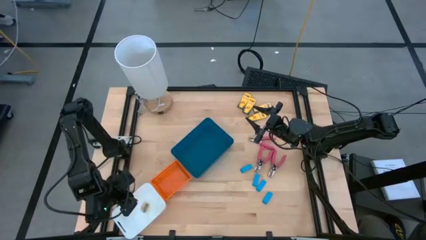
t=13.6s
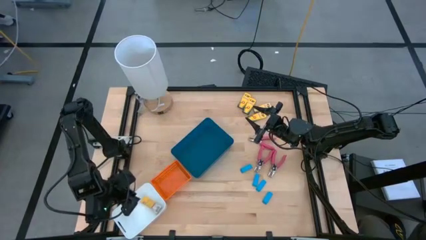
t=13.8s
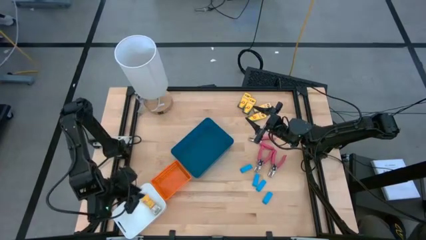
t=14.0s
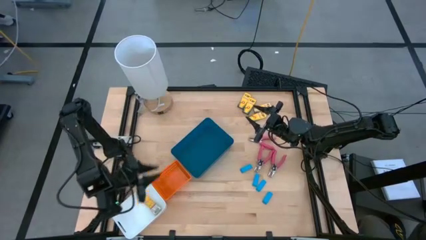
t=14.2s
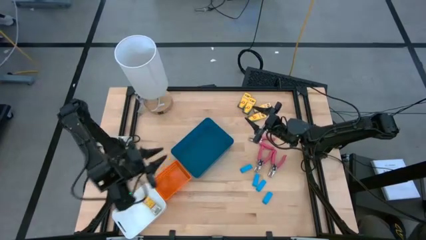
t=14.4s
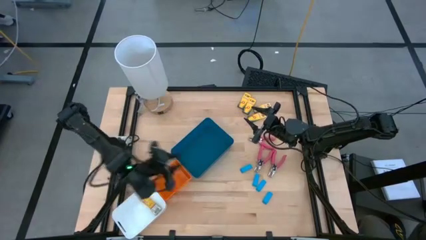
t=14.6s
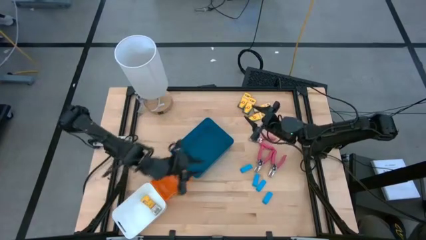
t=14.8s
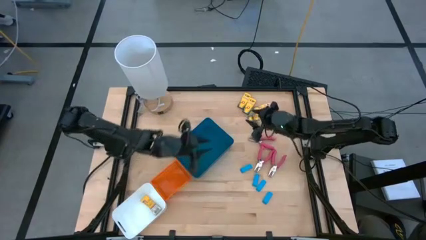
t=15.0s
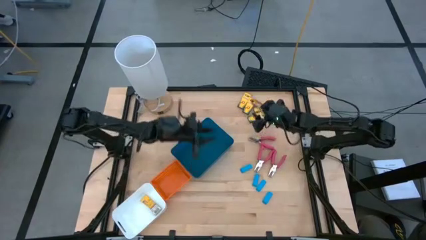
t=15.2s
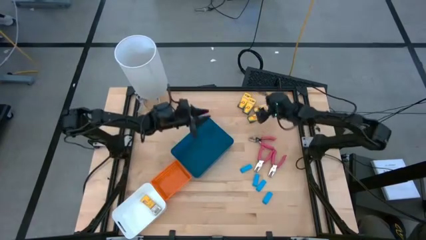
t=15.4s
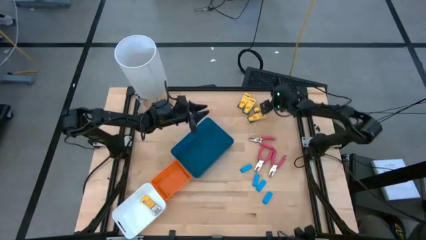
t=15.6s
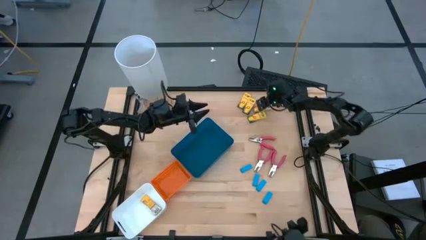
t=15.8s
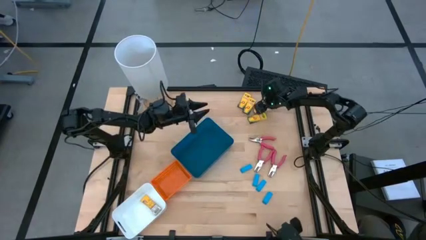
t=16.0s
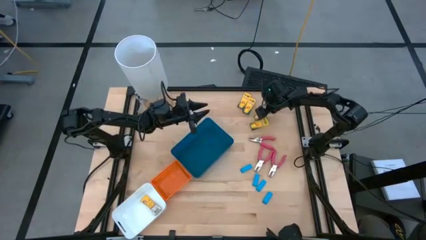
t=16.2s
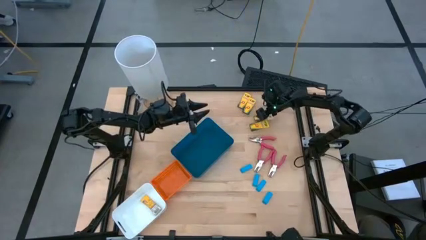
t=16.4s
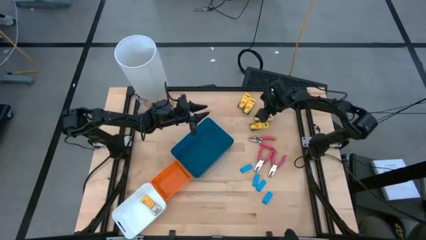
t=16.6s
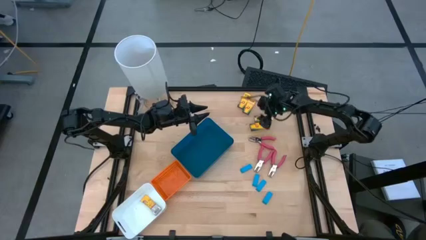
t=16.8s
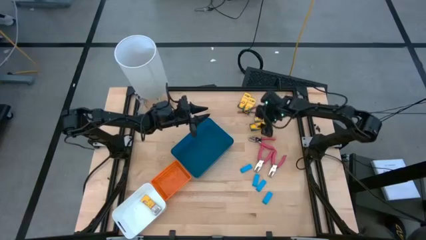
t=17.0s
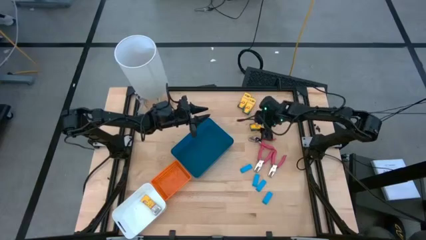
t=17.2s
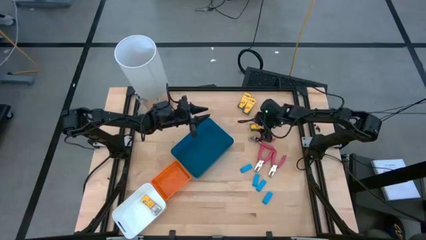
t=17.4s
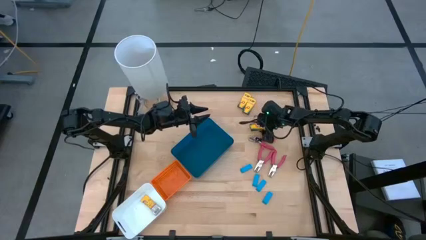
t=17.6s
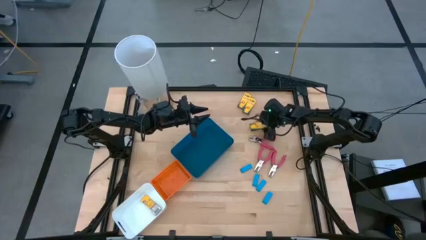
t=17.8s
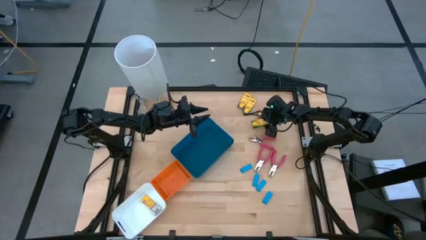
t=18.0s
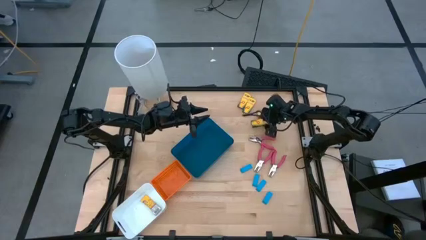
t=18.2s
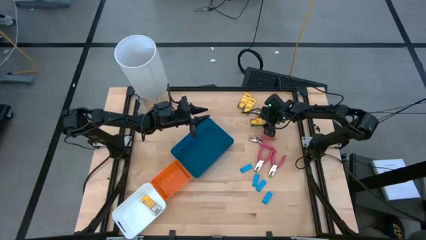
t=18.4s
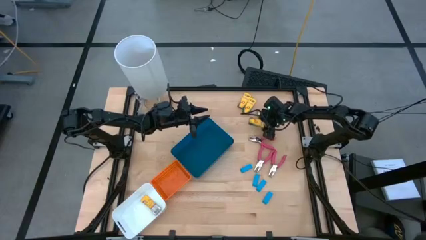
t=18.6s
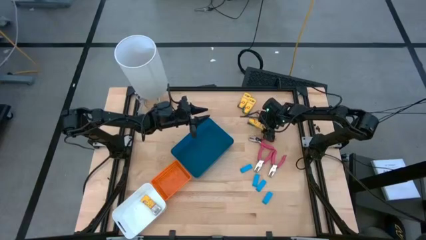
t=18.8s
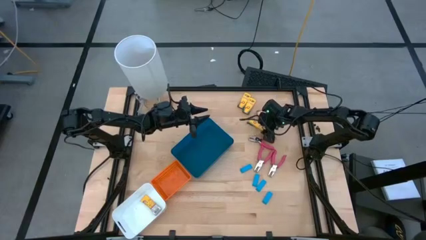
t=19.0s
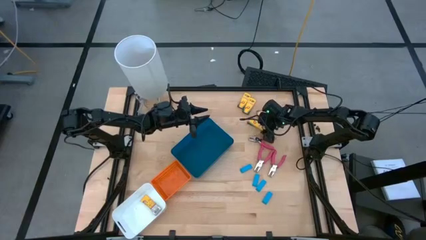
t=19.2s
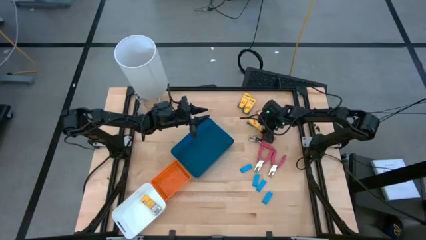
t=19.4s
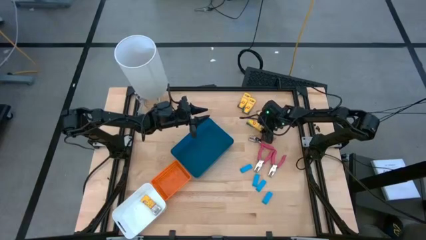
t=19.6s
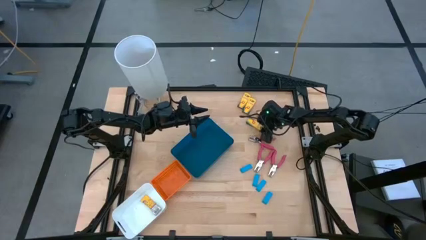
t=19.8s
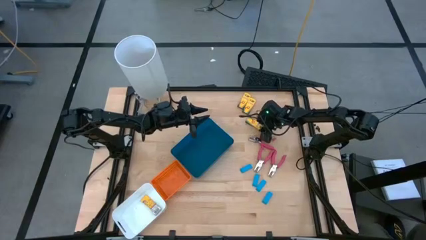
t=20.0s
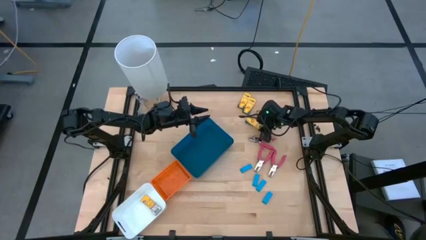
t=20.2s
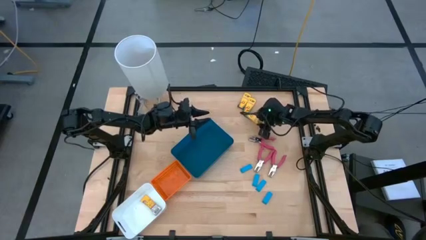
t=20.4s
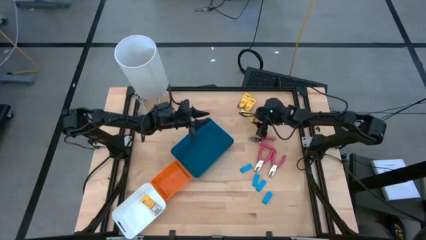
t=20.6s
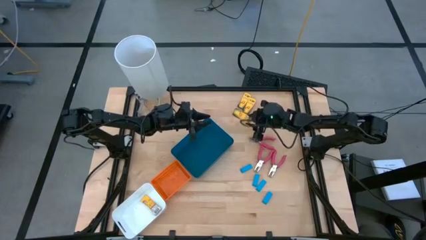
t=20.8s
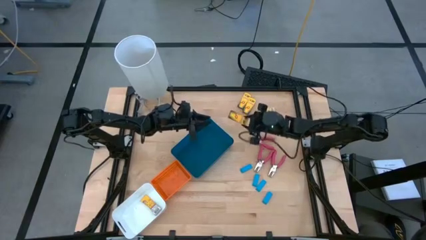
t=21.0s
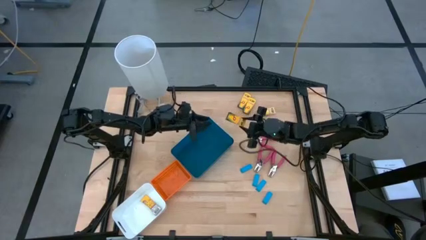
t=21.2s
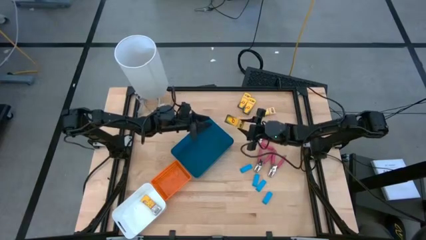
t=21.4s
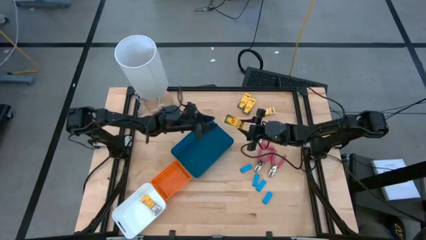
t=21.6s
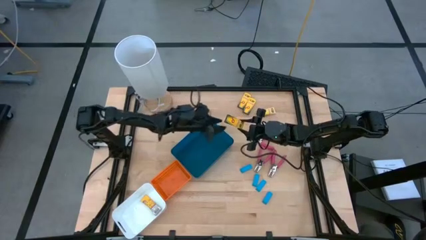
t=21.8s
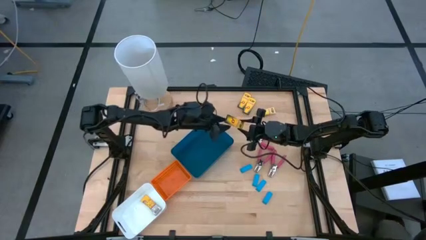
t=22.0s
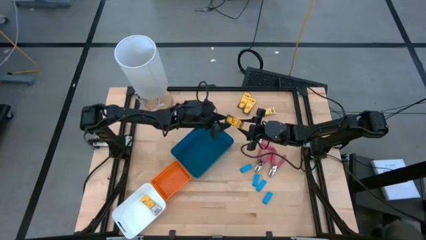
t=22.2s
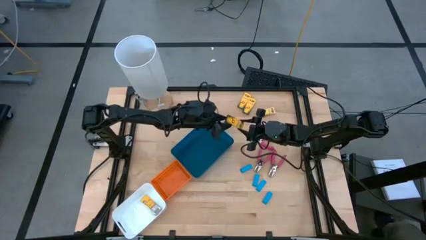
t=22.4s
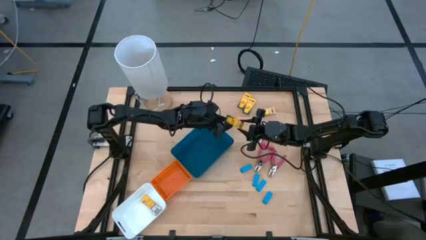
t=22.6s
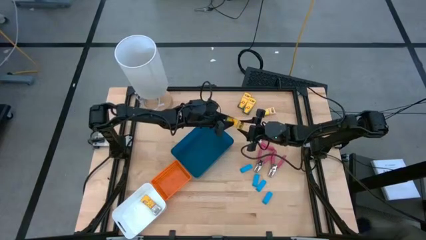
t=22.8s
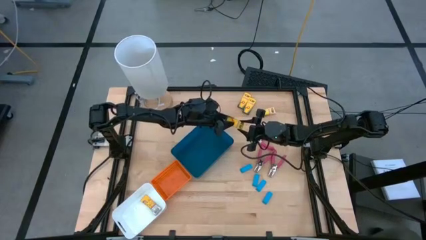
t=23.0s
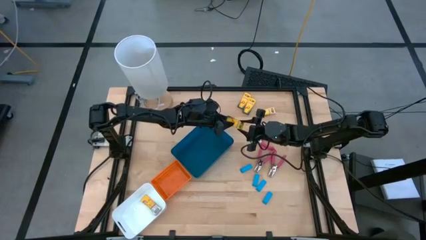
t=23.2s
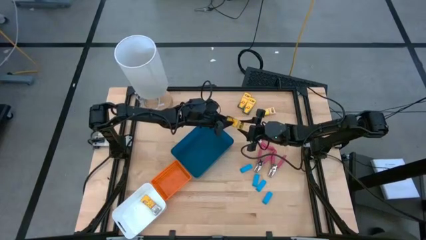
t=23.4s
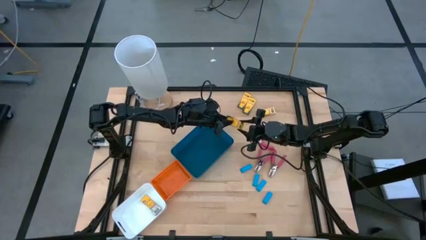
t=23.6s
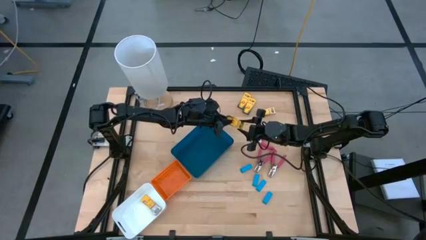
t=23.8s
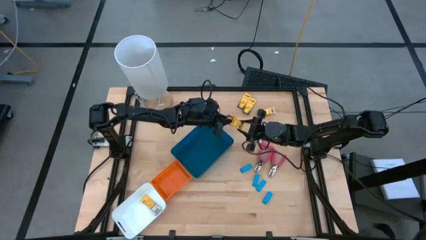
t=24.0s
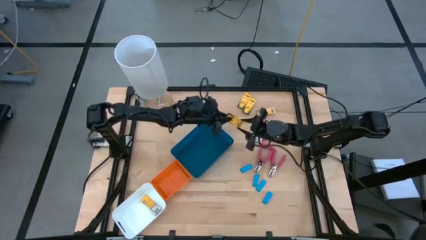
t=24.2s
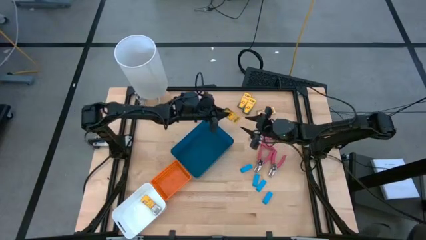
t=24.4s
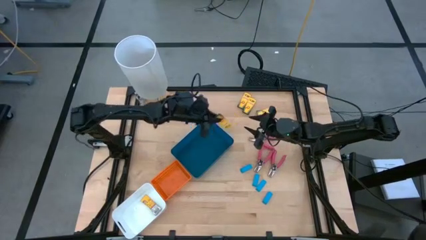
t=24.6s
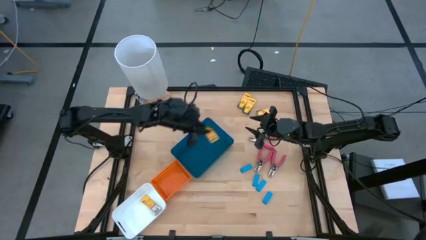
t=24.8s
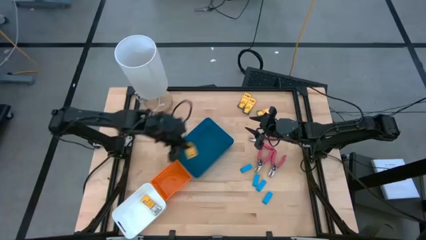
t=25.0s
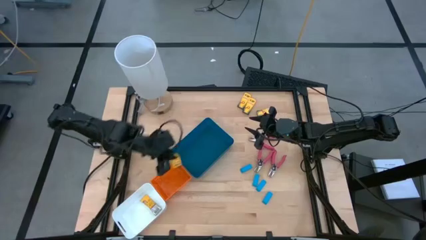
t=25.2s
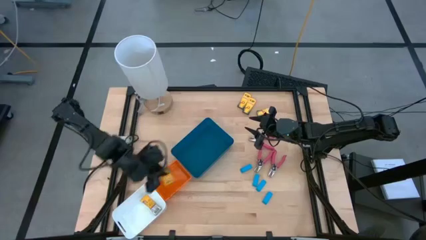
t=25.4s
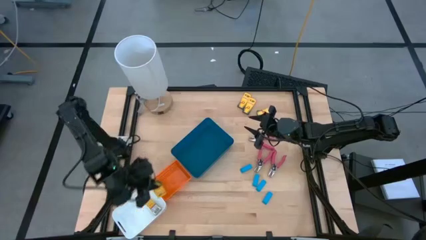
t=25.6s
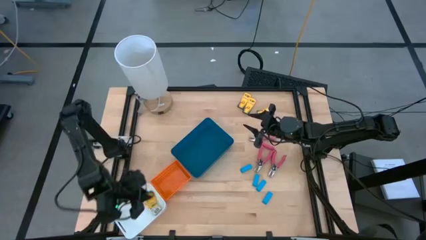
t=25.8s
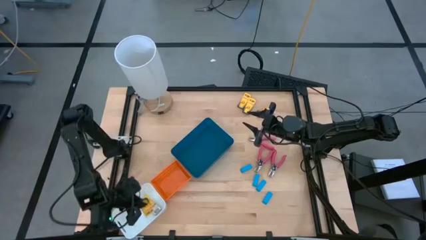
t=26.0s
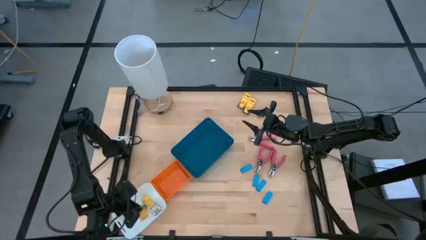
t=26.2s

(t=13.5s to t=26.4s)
Task: Pick & Place School Supplies
Put the yellow crayon box into the white bin

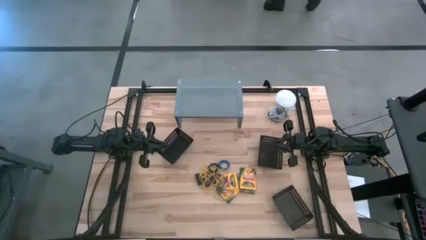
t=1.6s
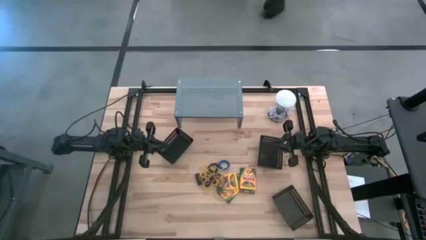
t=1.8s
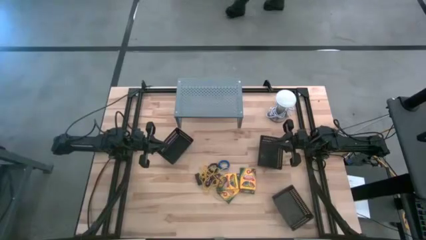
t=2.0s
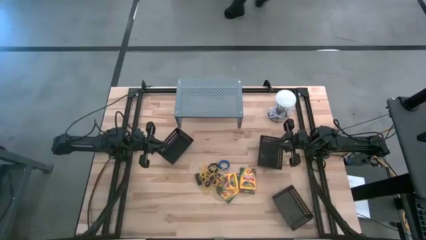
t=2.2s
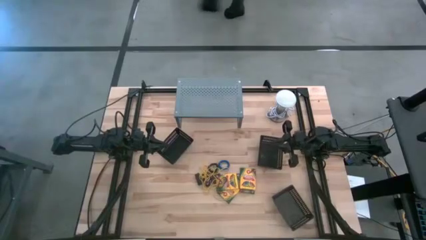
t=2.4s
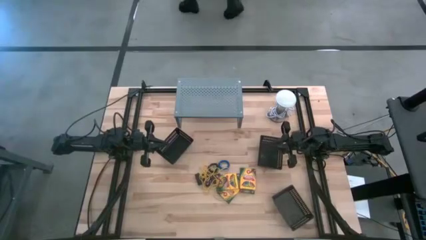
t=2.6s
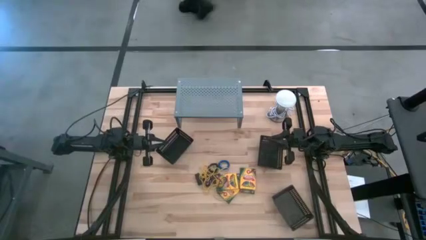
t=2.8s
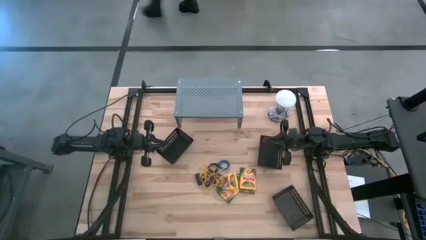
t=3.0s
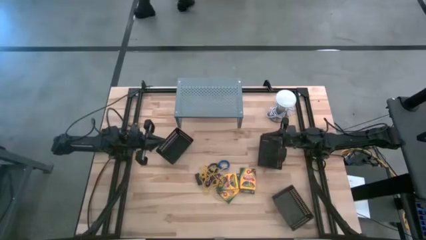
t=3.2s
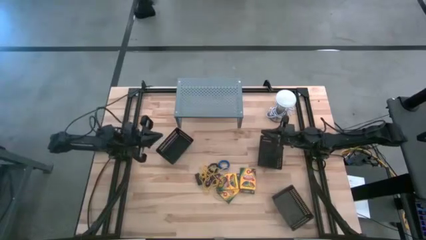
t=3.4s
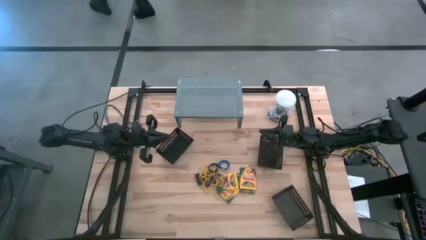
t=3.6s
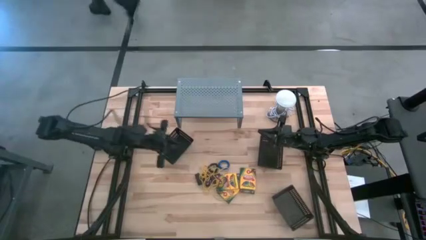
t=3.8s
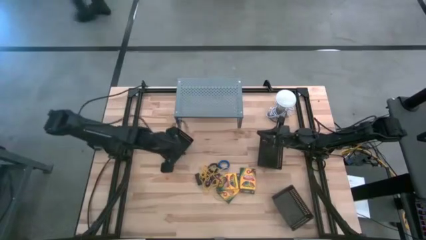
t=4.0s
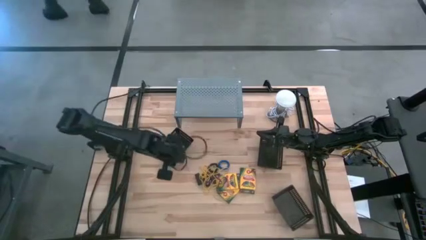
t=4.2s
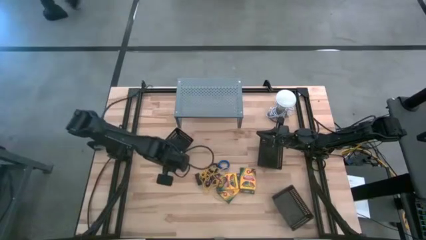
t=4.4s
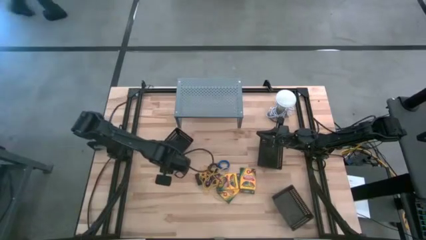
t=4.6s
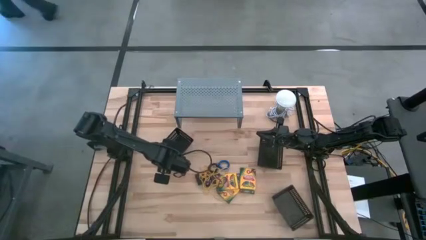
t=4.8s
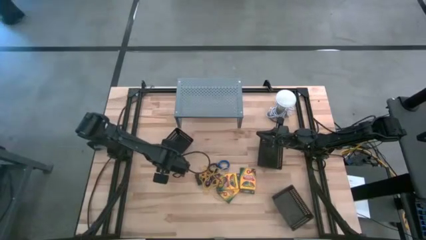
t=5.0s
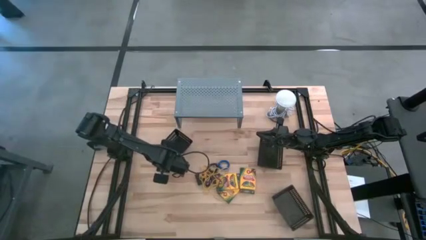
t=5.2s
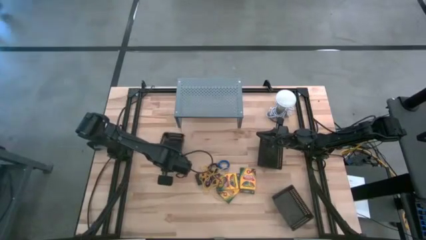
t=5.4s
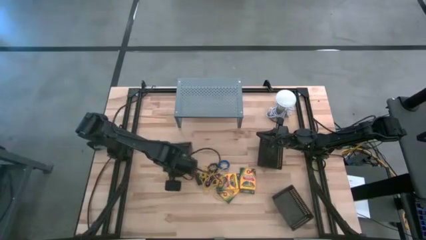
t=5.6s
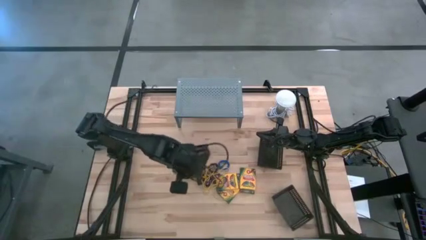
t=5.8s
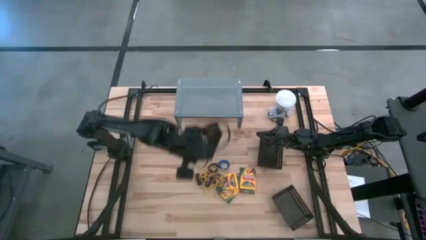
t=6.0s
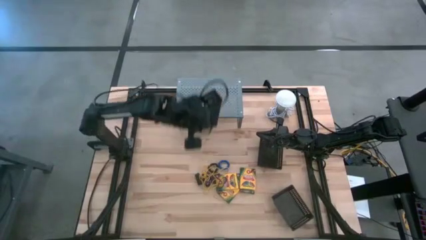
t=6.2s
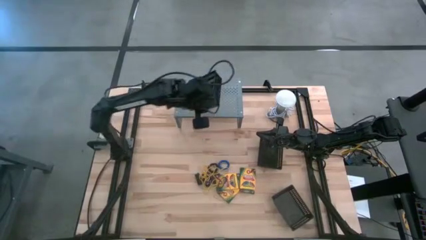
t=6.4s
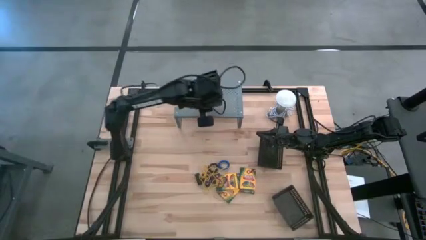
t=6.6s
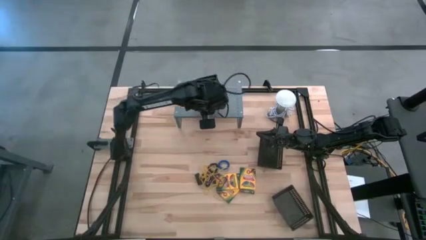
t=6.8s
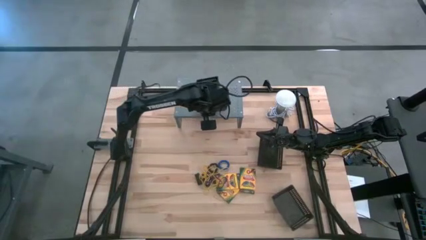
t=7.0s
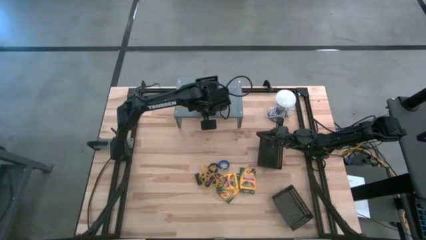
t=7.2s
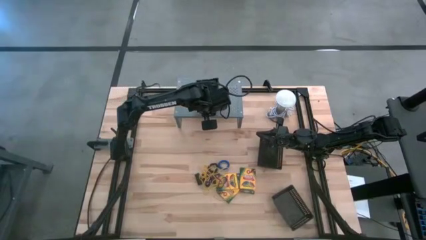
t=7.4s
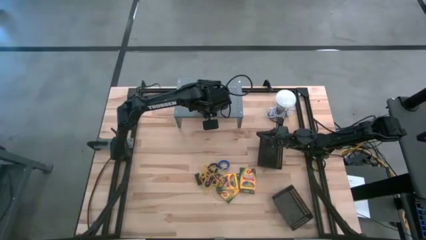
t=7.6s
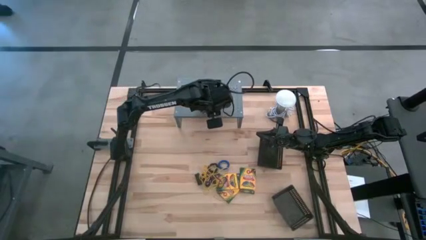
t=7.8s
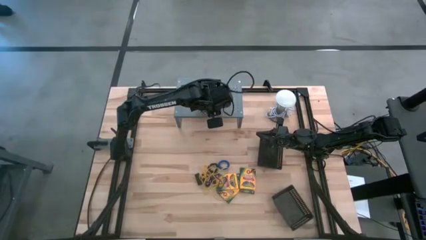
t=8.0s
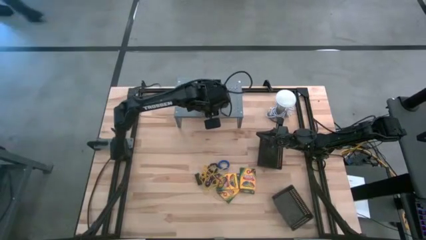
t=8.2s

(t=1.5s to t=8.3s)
Task: Pick & Place Office Desk Supplies
Put the top left black bin on the shelf
